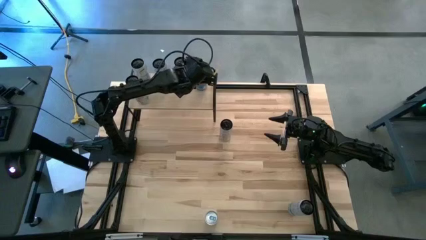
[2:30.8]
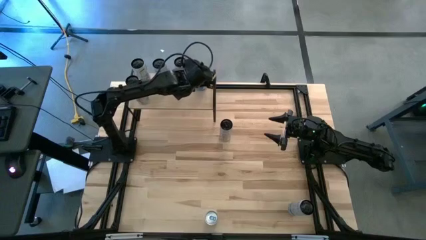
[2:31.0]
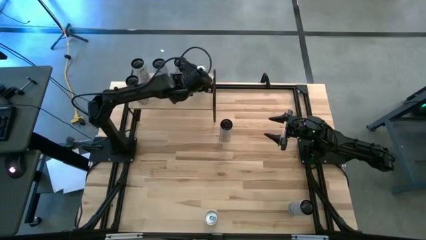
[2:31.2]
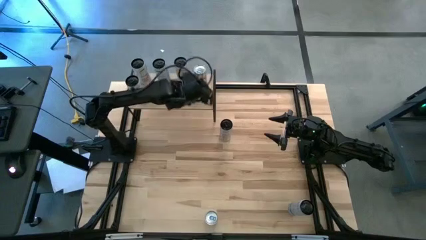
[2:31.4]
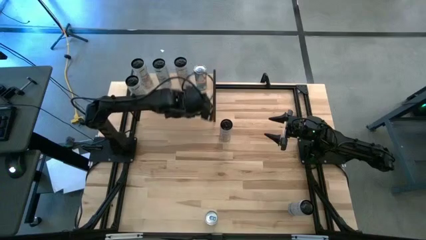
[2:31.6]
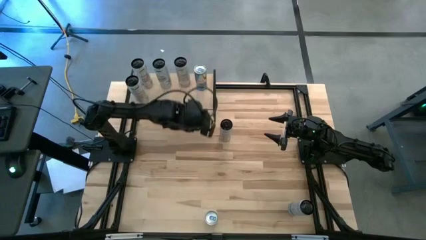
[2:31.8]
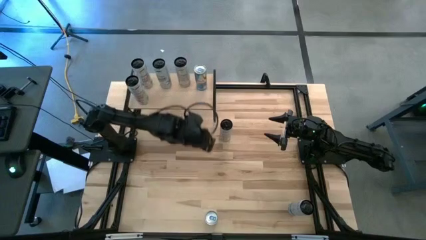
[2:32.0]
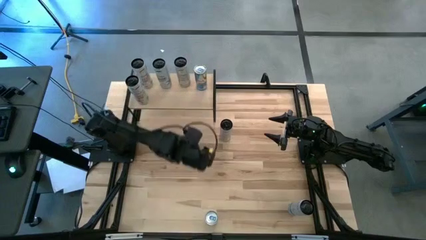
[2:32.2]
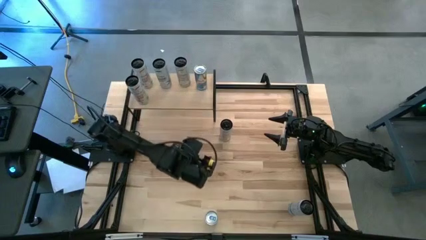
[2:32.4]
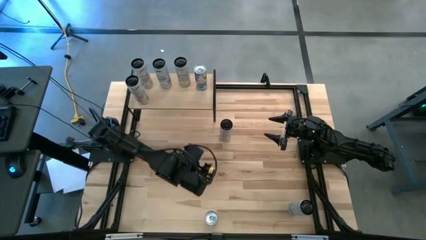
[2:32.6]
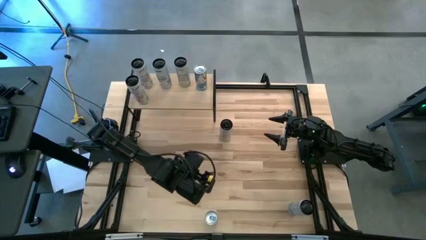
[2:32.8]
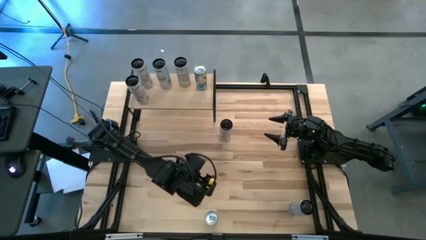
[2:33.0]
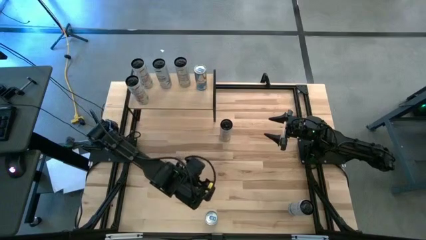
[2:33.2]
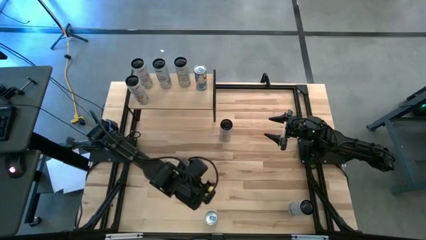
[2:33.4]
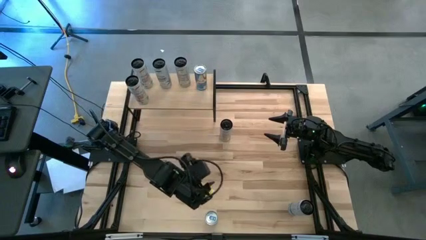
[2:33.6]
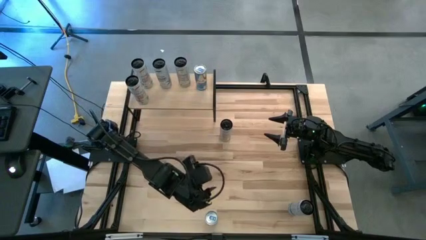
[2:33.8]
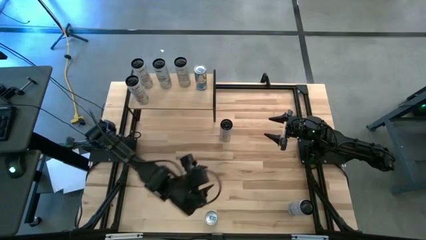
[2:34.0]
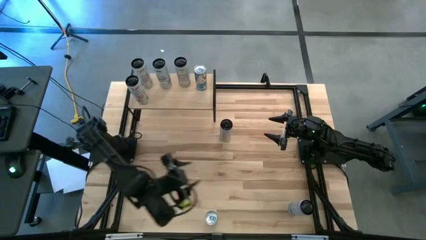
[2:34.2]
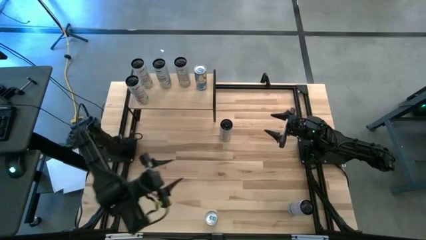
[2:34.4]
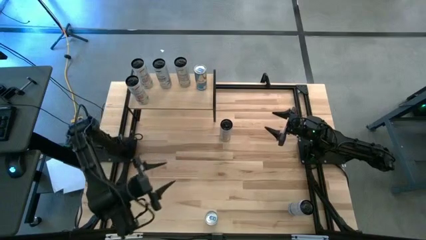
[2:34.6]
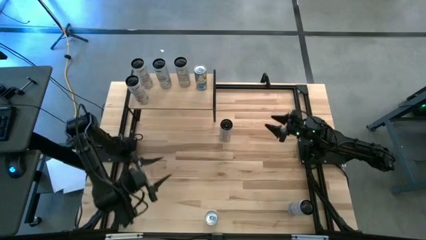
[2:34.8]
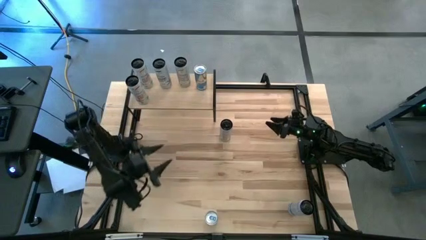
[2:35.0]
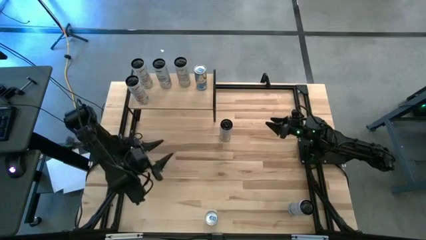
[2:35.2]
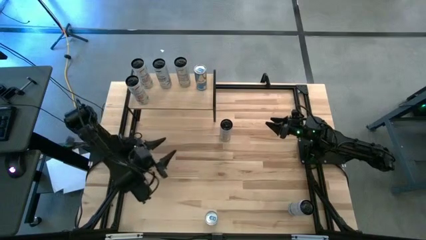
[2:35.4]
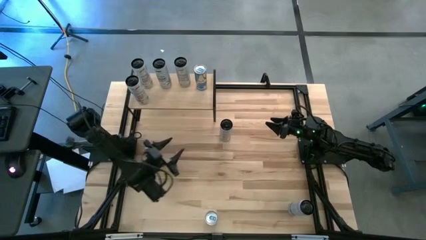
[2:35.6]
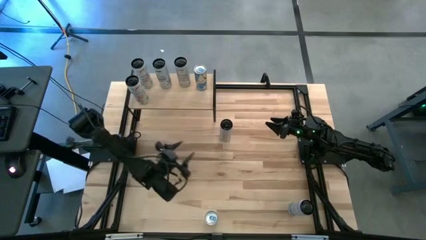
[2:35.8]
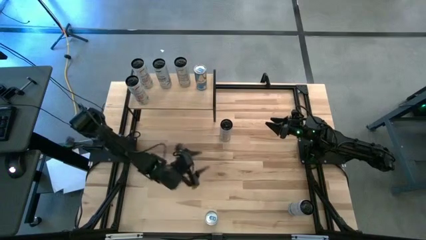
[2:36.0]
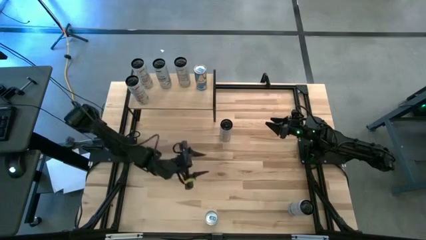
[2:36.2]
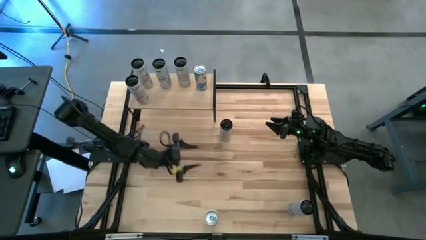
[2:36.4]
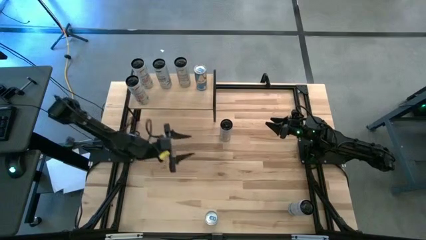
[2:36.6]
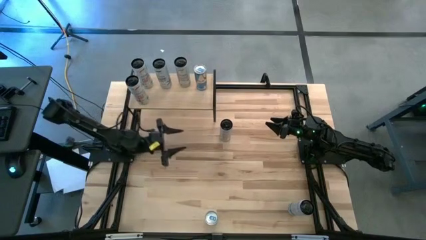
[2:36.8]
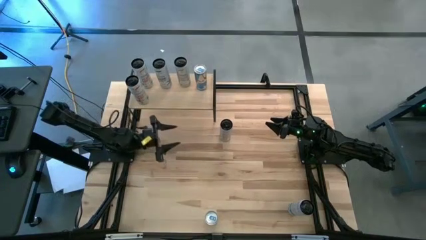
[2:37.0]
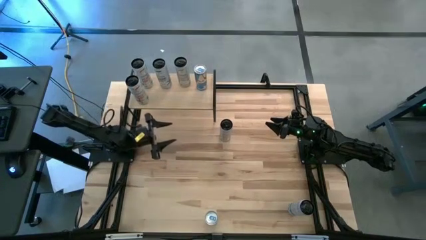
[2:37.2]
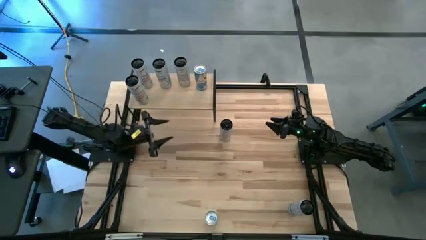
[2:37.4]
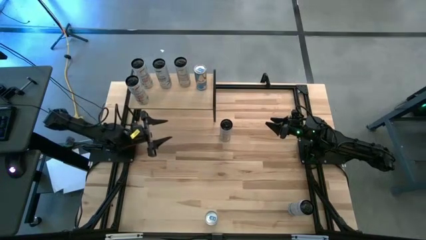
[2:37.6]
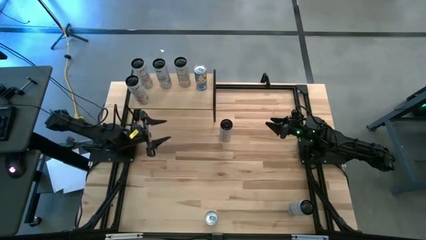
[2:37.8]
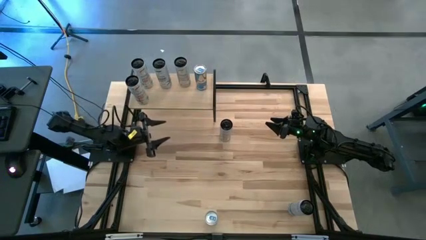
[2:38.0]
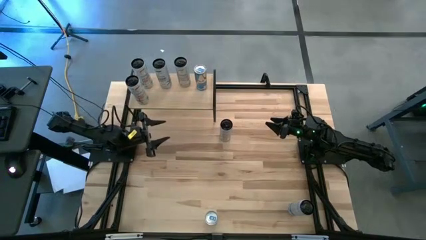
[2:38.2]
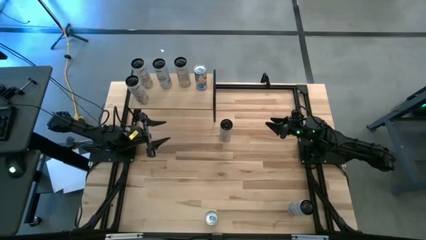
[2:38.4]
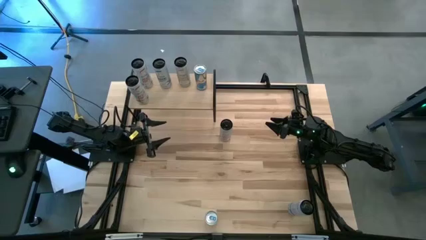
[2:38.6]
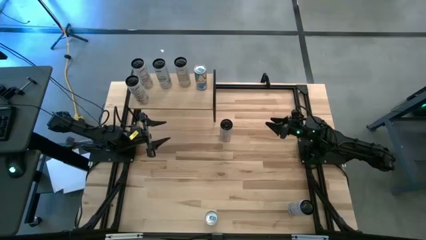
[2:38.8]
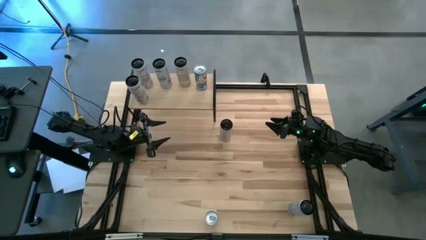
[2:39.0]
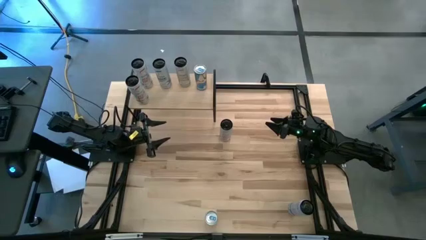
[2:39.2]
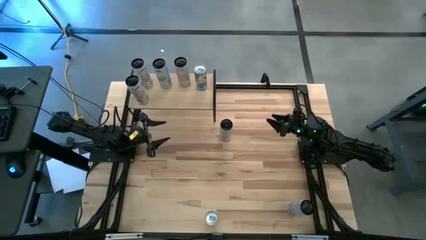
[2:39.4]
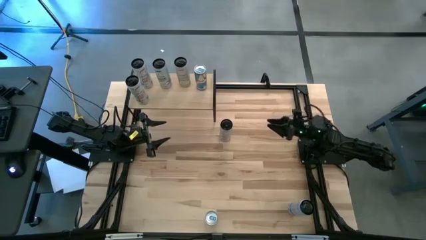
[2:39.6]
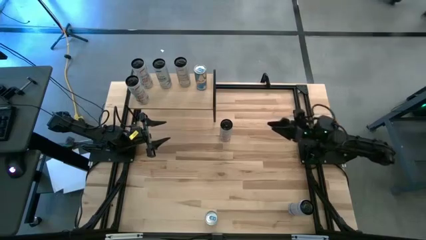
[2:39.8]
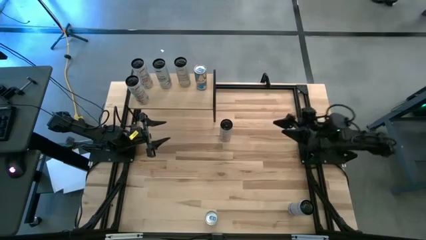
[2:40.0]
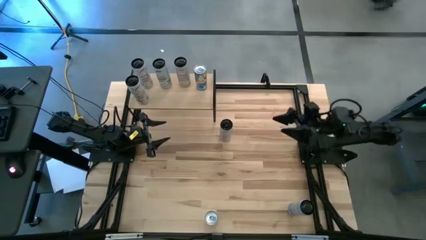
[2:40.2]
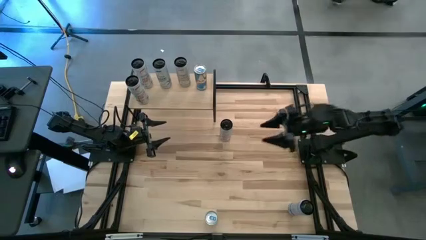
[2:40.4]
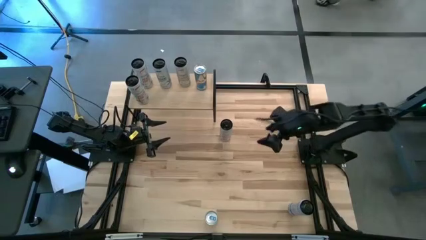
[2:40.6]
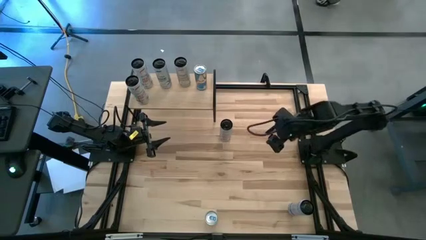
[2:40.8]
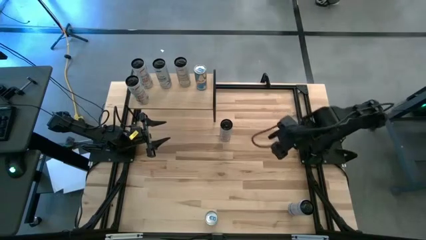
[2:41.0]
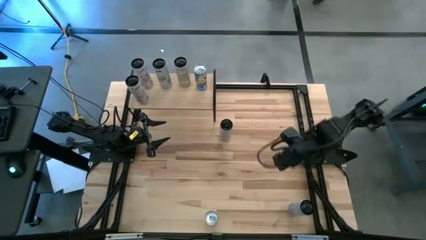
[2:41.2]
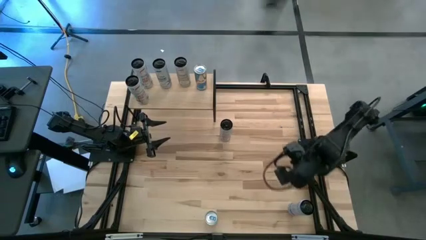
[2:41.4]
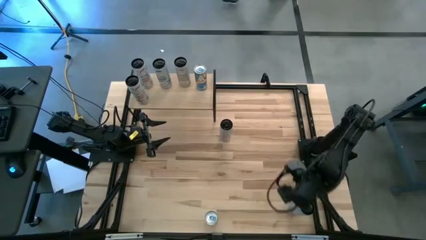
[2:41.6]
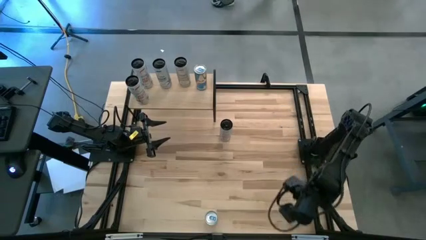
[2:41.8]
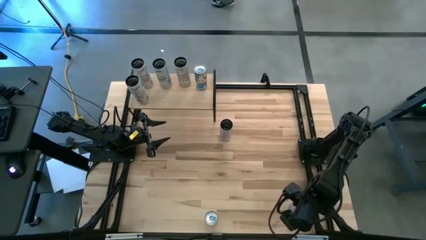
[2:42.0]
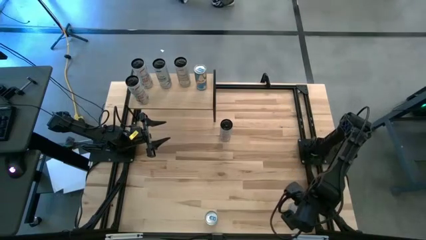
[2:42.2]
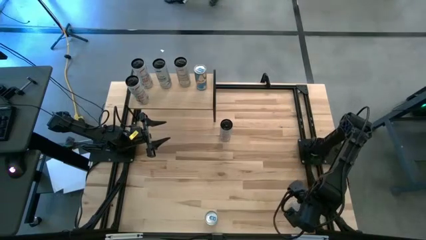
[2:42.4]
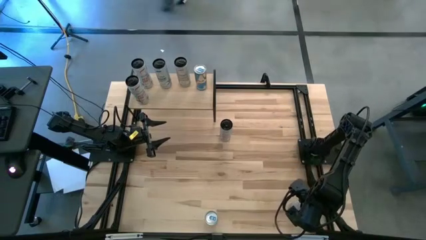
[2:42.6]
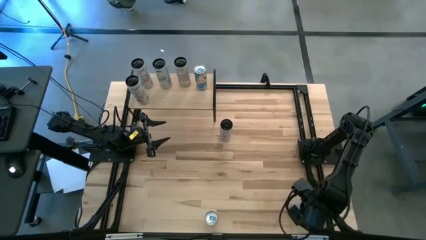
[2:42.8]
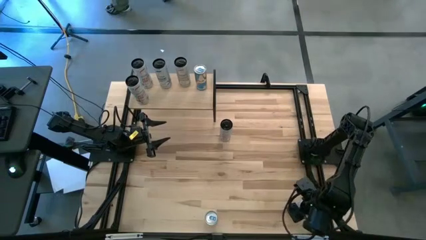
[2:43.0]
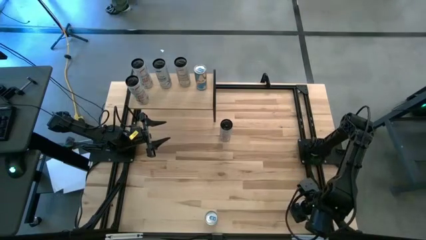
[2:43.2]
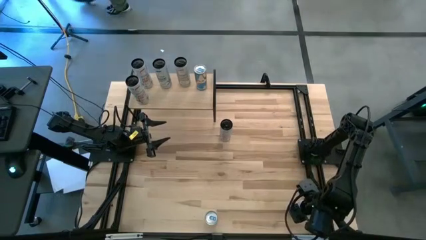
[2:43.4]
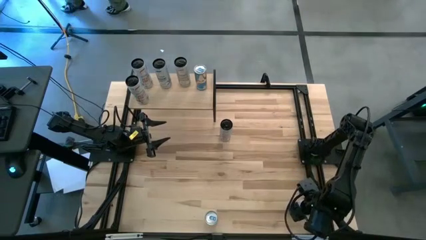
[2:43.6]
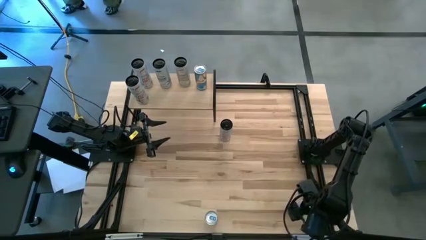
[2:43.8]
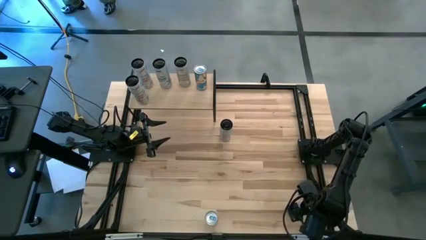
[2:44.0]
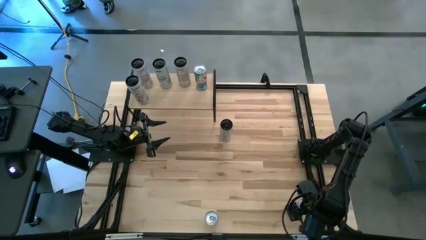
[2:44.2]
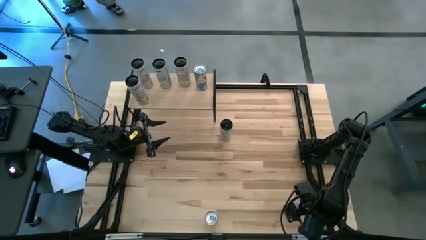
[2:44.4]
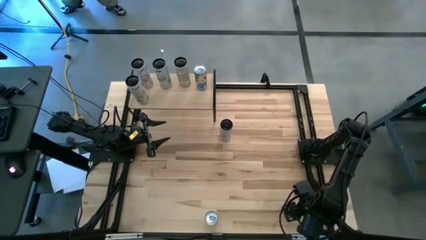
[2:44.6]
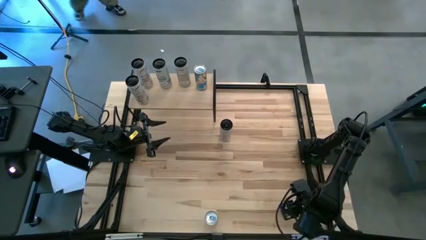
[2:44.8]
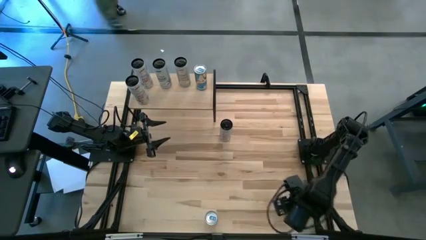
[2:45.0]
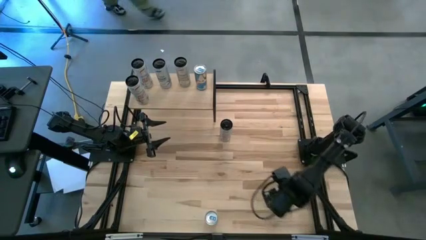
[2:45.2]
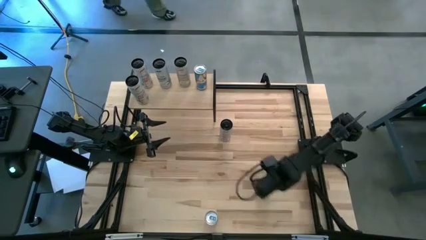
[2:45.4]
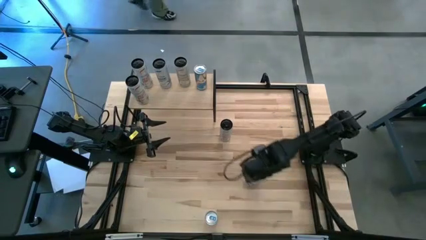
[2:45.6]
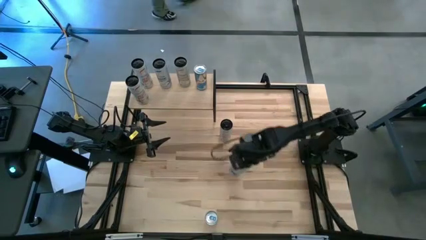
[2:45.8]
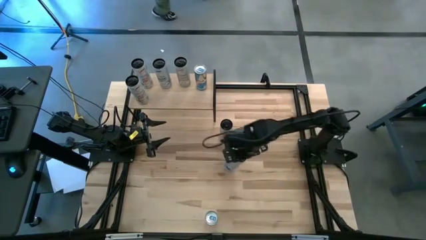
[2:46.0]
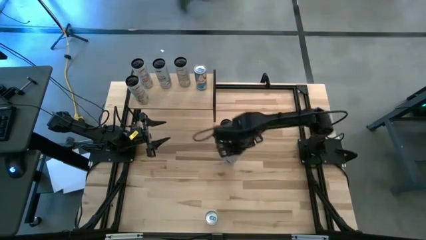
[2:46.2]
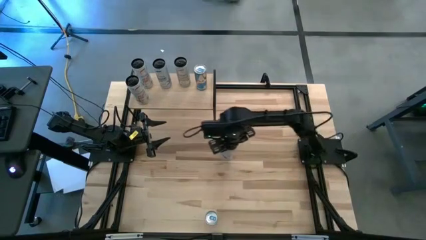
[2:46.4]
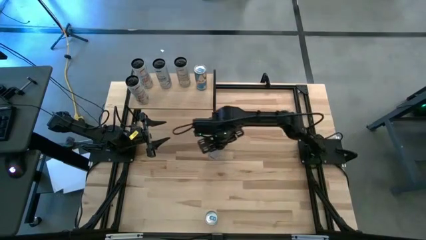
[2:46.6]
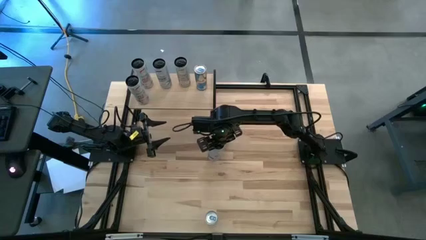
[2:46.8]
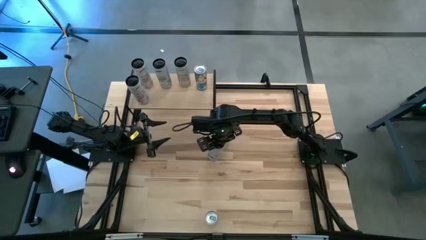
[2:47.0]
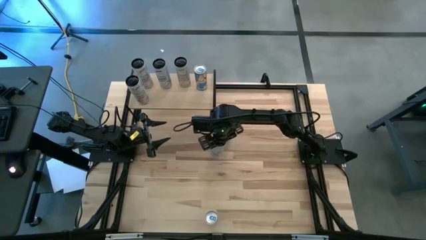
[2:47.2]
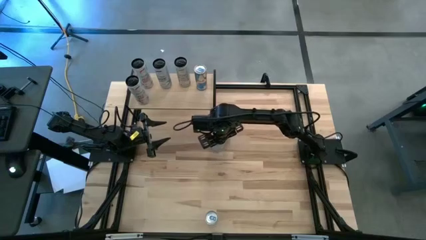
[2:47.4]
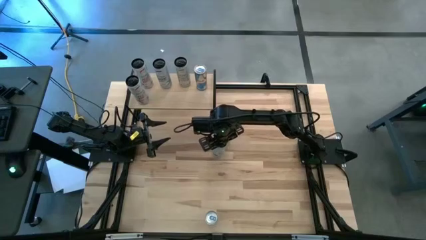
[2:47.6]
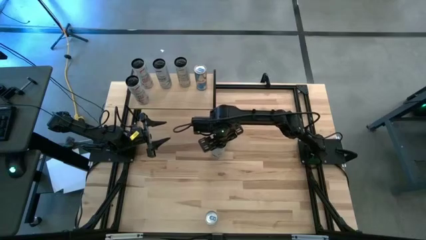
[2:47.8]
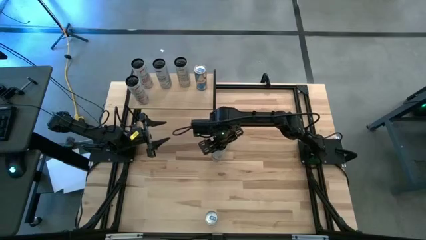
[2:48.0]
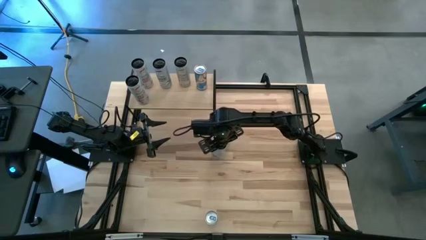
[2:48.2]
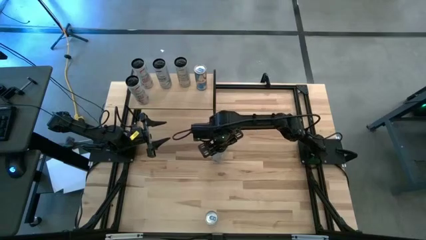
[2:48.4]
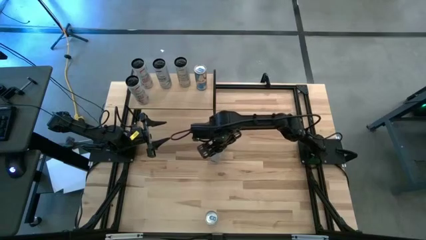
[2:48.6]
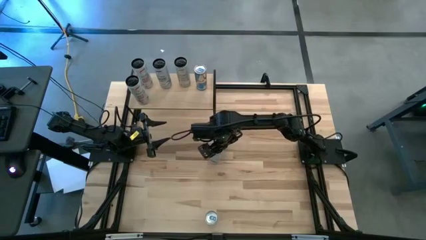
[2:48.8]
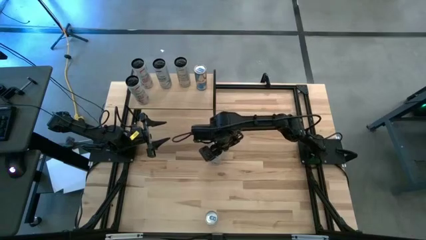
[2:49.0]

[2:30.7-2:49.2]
Task: Place canned beverage on shelf
Move the white blue soda can to the center of the table
